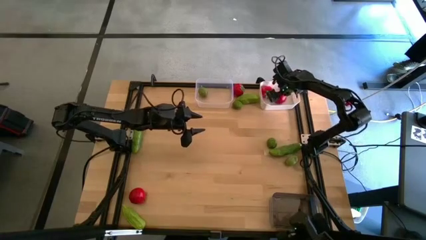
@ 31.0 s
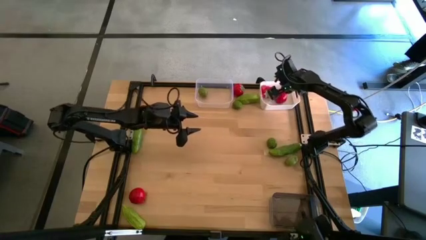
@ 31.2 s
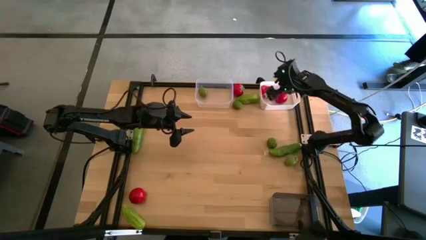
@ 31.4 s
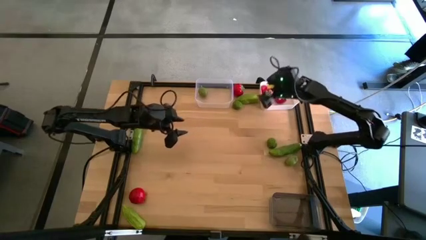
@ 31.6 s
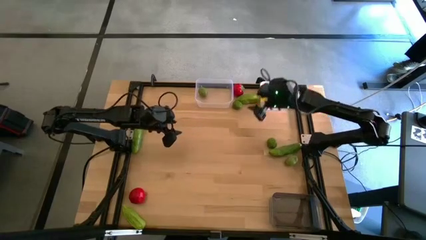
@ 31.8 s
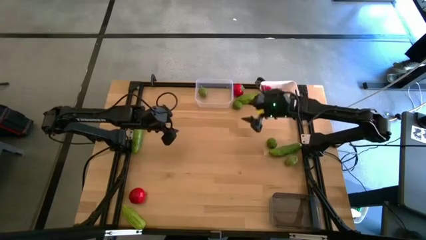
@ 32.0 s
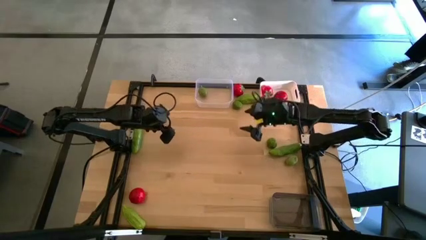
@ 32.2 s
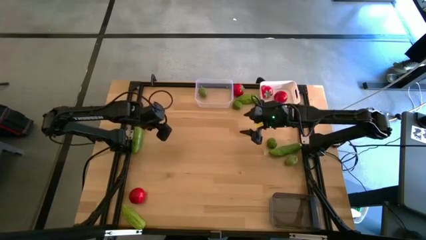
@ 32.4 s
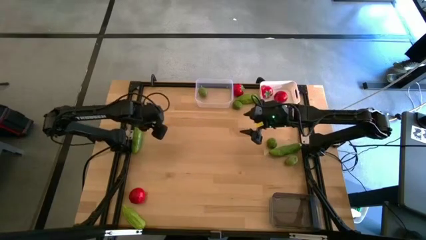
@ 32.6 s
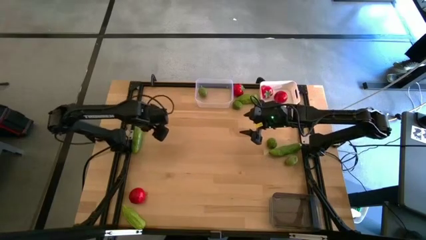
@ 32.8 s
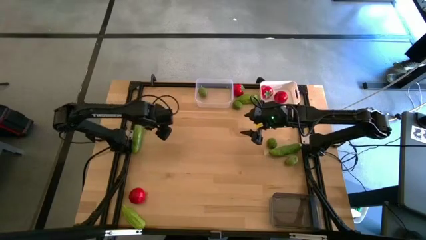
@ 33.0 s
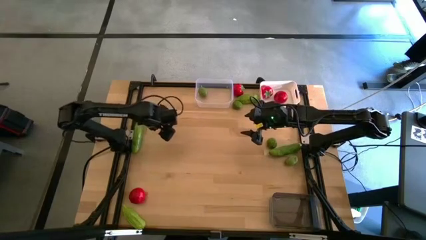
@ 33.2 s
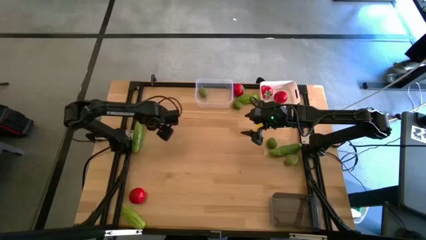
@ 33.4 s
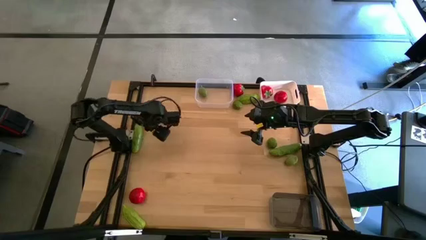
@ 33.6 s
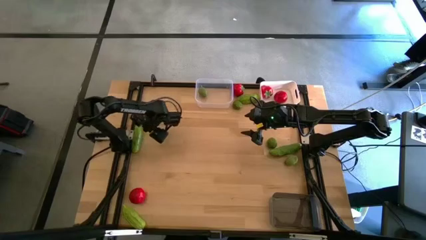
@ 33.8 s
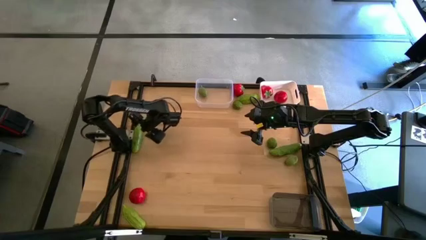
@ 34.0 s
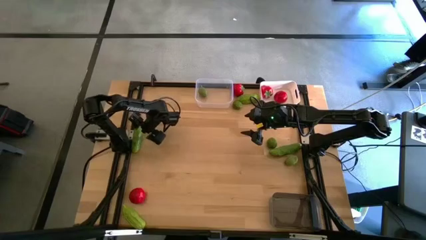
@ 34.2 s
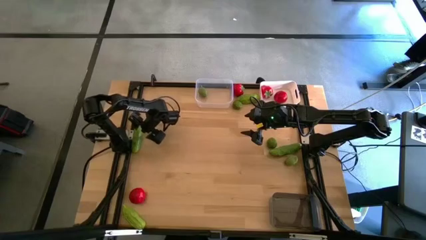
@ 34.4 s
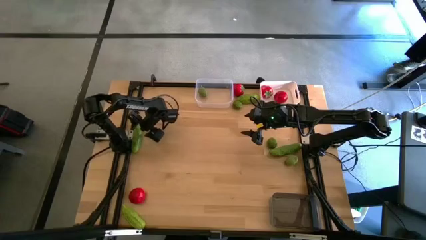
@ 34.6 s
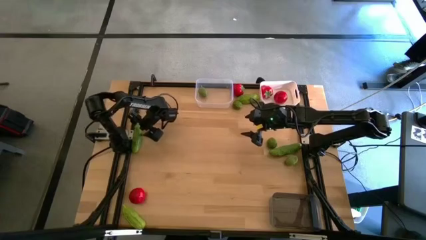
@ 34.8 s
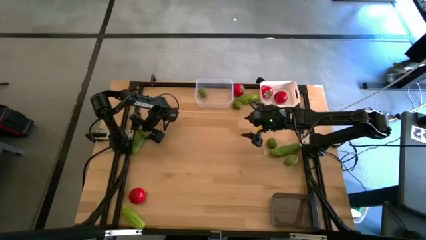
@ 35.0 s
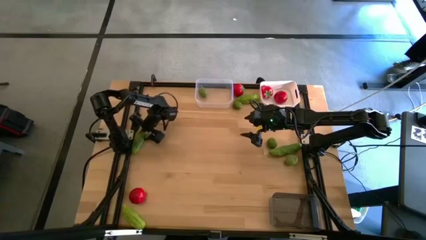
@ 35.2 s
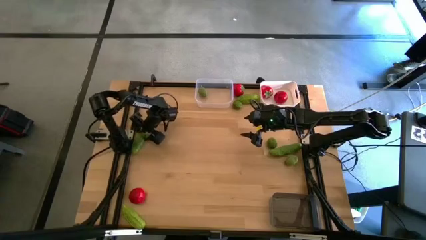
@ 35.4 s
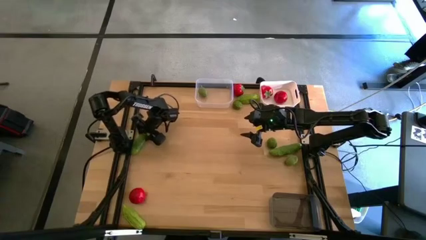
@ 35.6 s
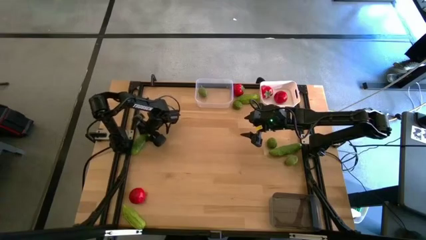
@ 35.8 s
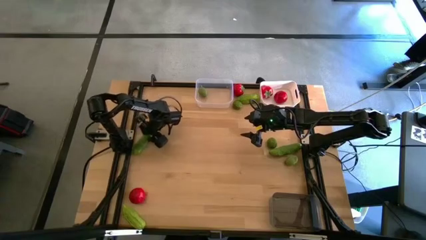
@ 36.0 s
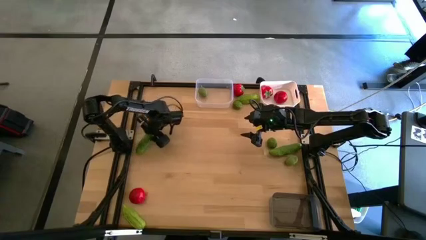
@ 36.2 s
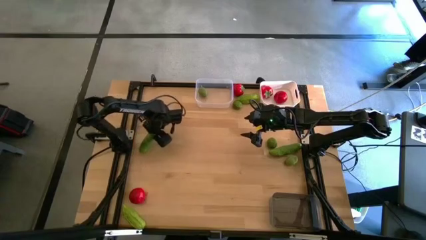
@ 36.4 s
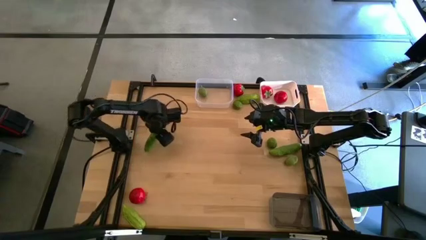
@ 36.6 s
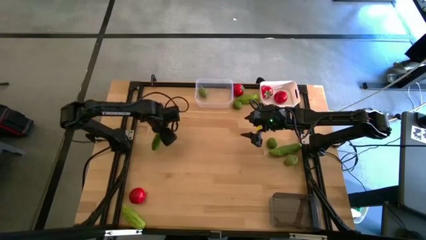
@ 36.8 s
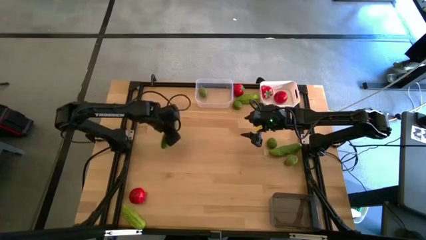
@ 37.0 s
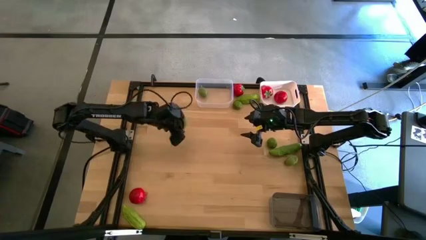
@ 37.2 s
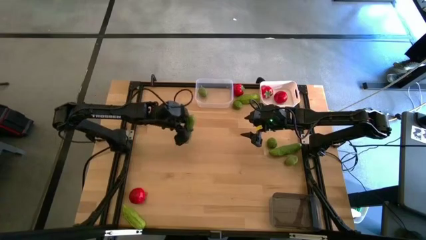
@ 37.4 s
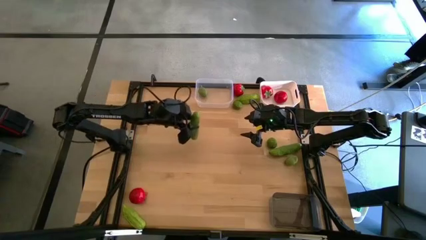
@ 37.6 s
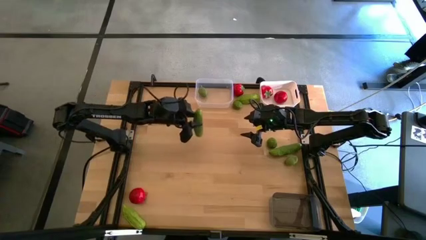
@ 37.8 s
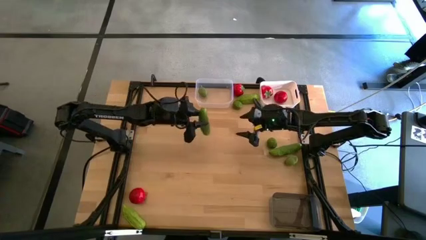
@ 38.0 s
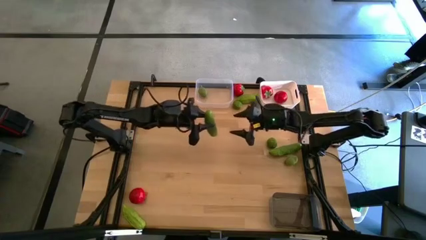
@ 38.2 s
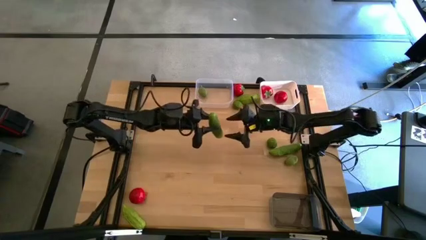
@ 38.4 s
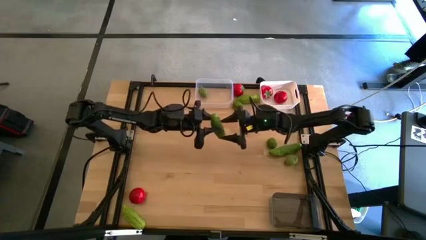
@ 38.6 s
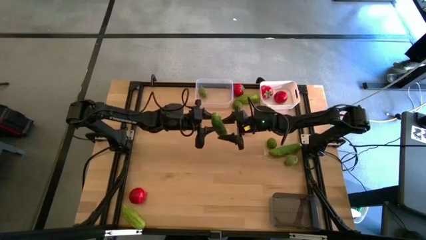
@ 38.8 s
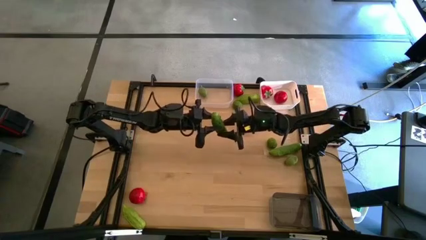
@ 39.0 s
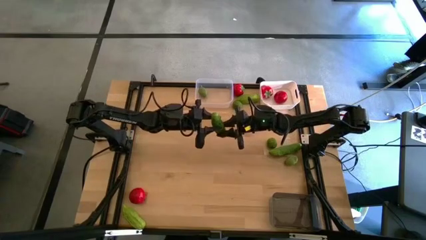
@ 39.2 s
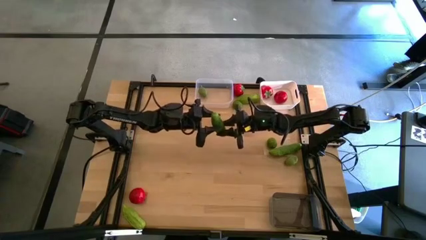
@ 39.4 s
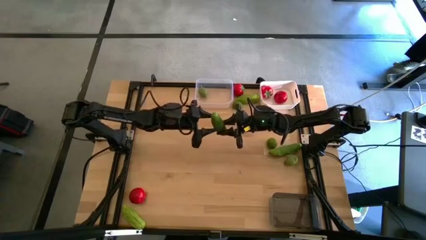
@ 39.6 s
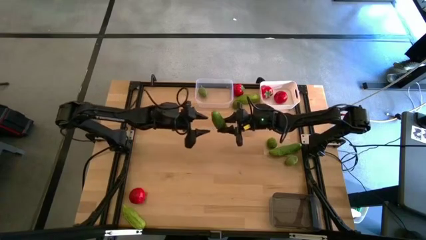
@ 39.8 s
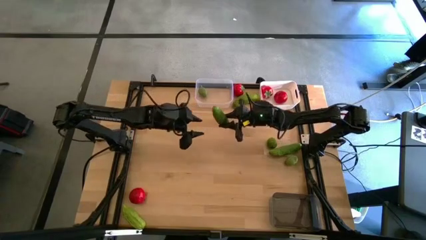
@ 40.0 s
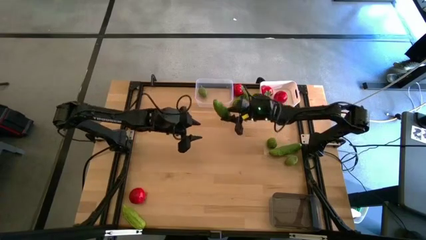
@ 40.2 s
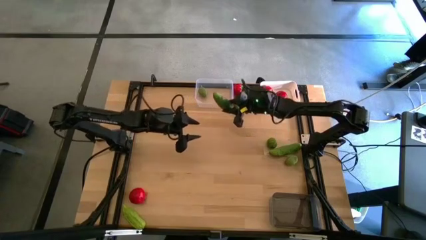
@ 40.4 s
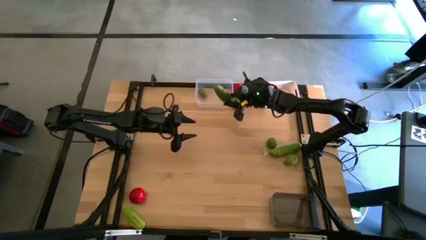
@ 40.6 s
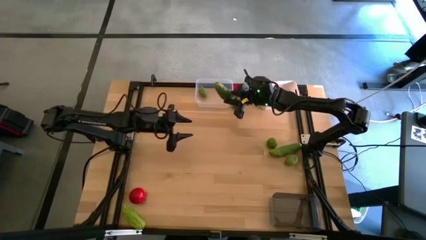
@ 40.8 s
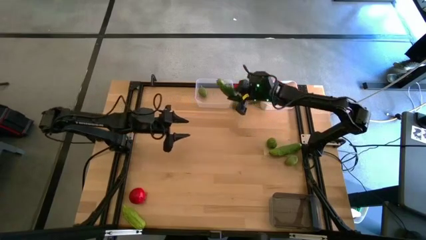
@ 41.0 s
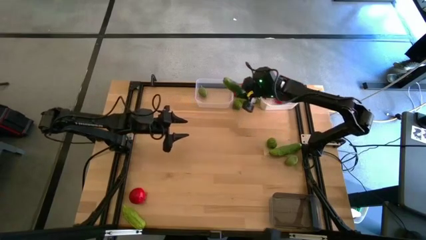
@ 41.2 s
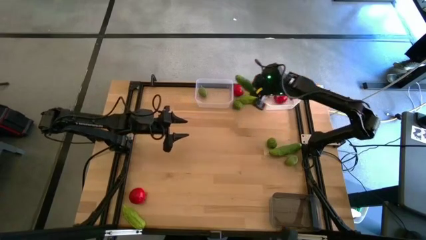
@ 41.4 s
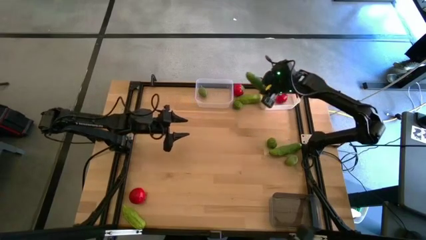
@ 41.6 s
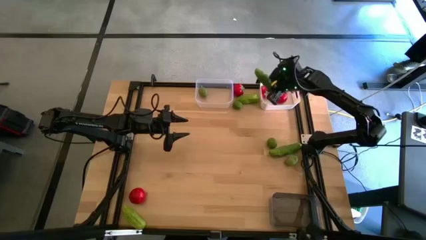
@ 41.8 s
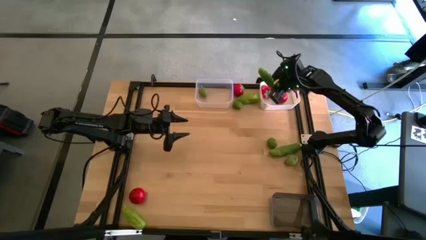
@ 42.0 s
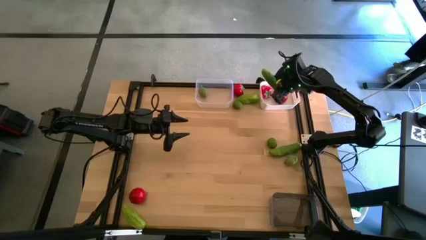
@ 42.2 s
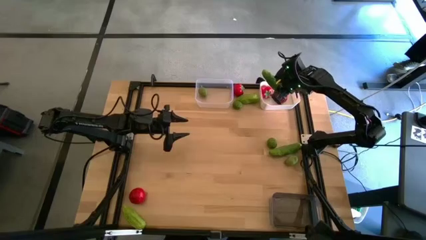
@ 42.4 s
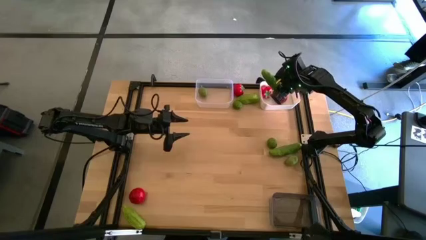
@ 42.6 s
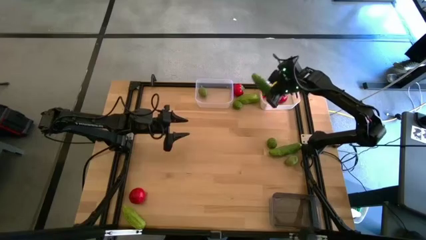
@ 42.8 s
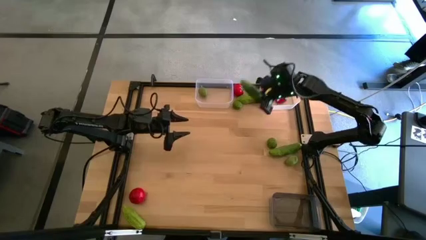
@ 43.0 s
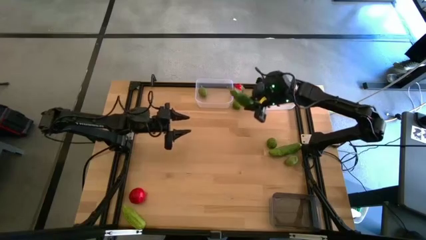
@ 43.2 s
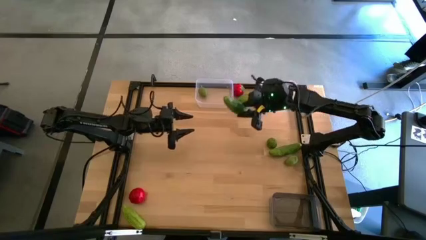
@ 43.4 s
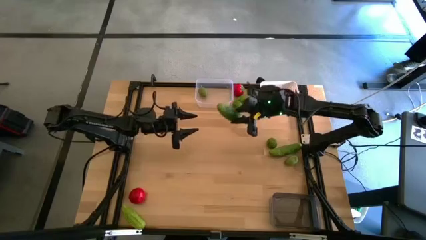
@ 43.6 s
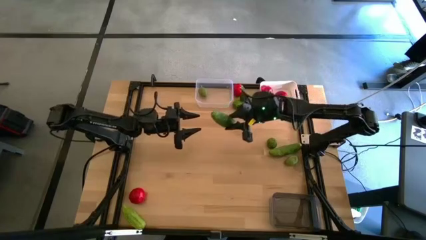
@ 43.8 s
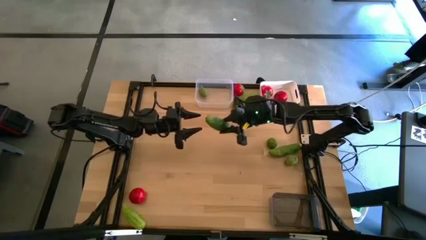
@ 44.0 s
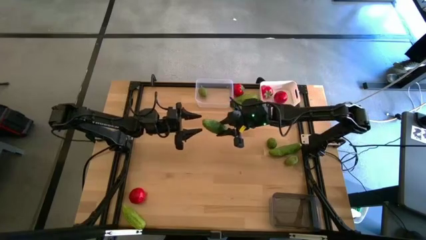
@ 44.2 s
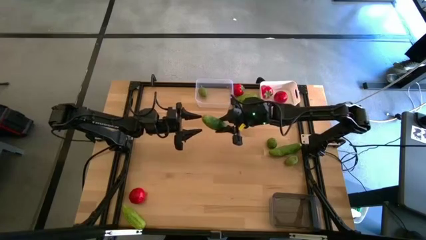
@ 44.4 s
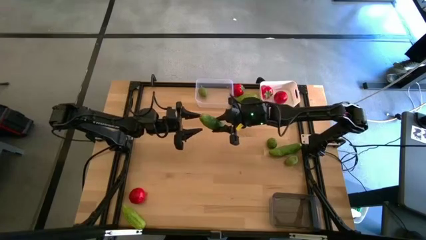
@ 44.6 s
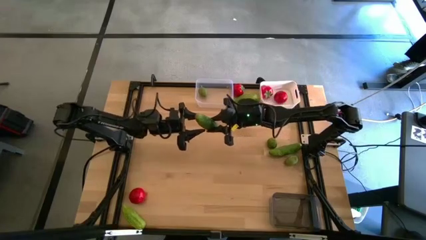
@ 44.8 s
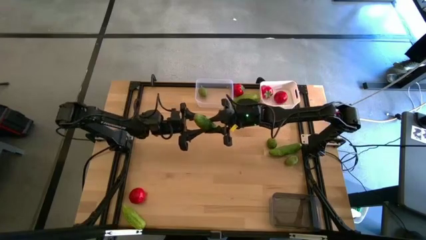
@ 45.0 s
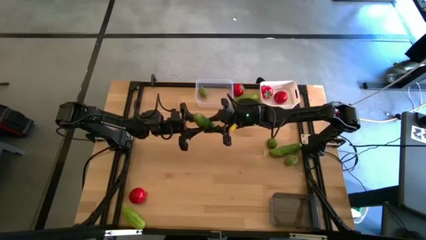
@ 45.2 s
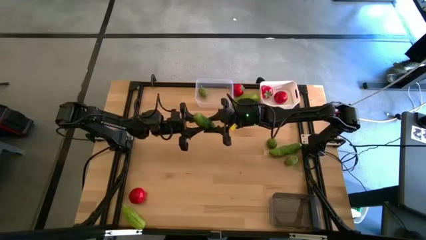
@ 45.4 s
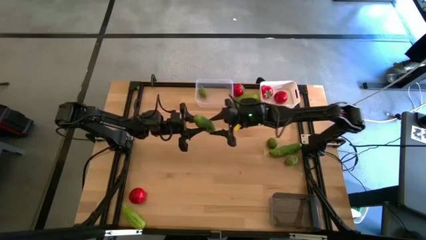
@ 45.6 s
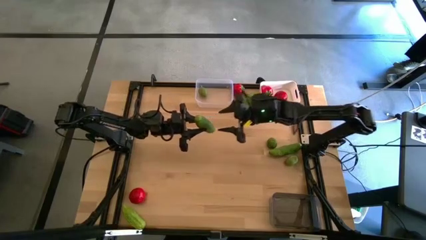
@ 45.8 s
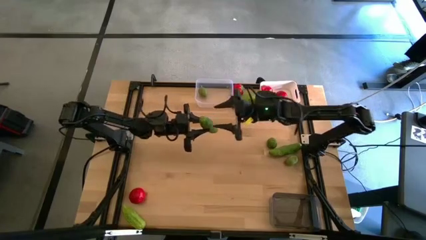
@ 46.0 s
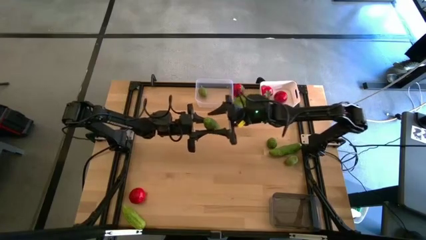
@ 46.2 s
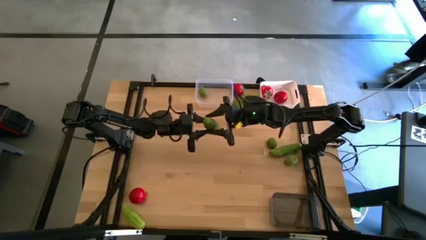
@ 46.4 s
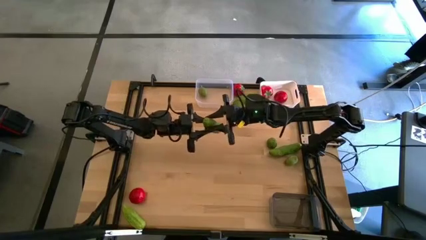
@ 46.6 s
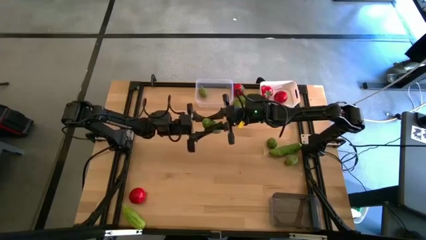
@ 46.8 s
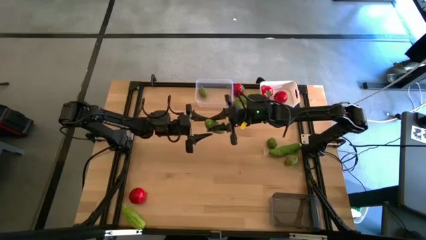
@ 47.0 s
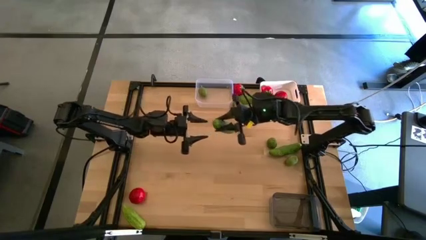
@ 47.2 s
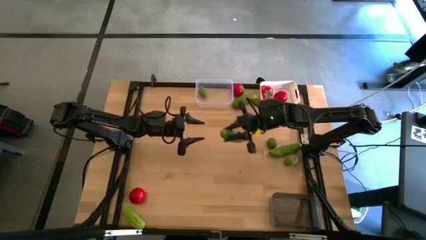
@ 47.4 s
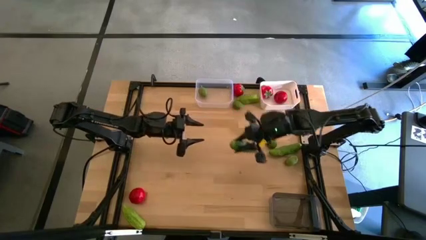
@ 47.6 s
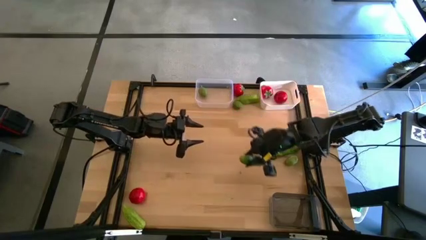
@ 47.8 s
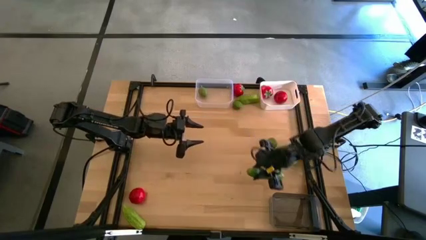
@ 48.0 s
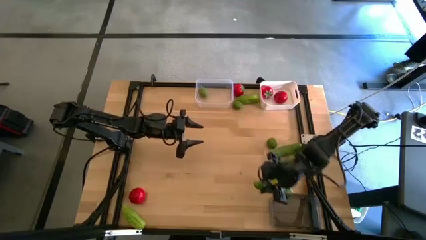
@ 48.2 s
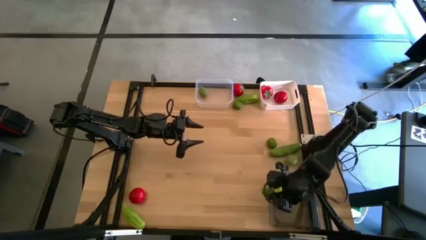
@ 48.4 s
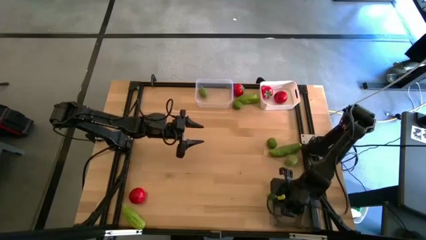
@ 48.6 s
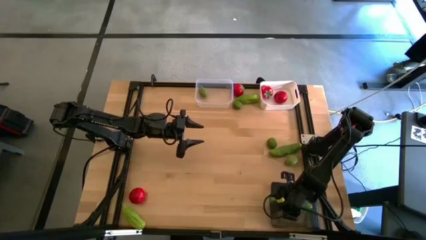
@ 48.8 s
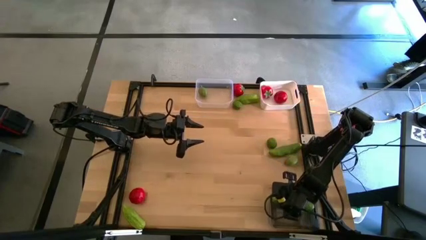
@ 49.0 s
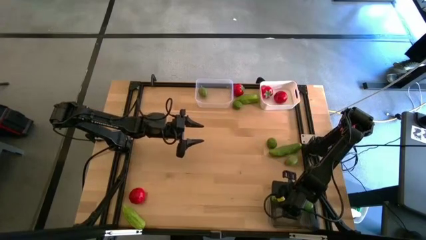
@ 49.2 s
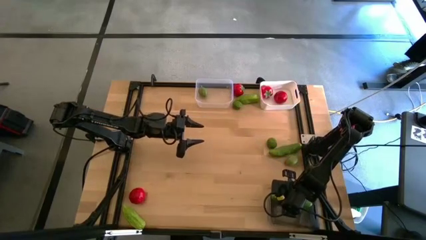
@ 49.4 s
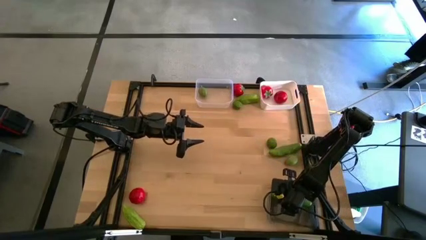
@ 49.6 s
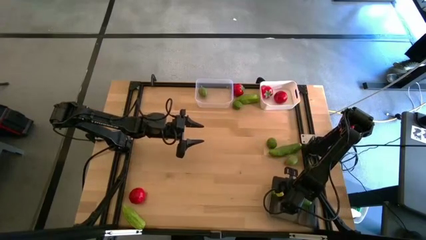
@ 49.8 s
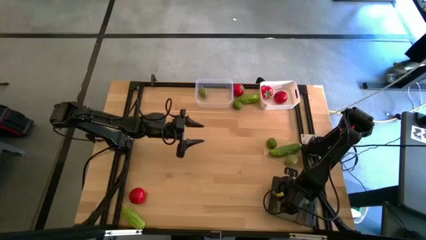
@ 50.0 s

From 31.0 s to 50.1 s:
Task: Sort produce into baskets
Put the green cucumber into the black bin
